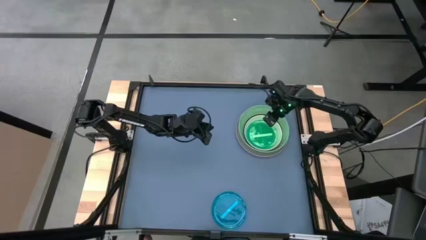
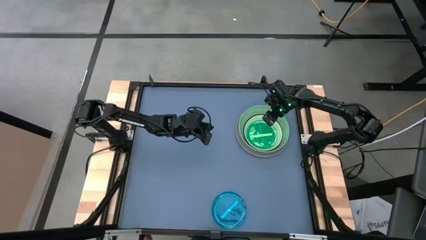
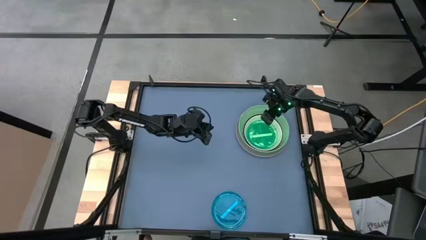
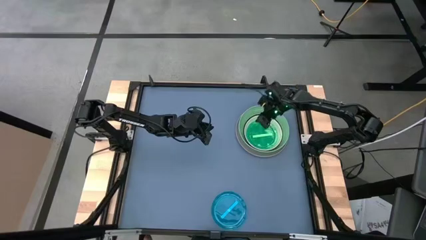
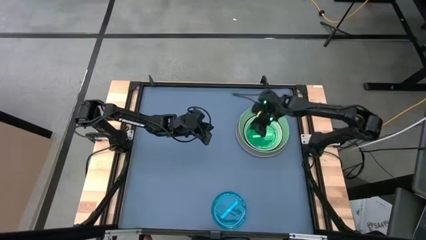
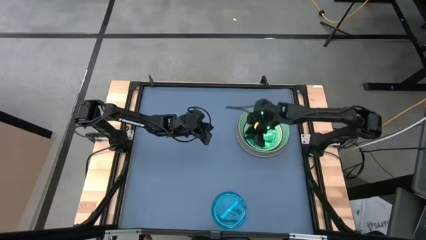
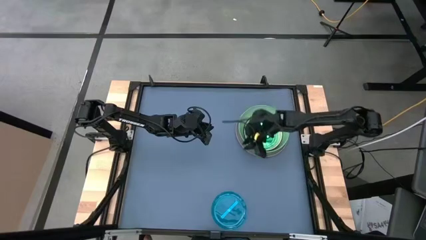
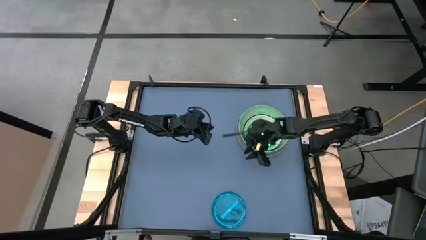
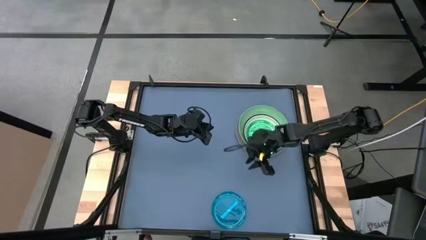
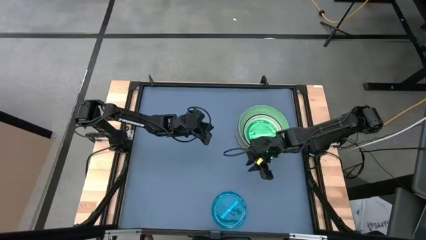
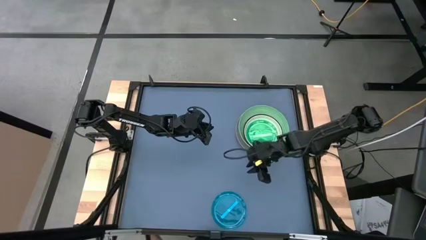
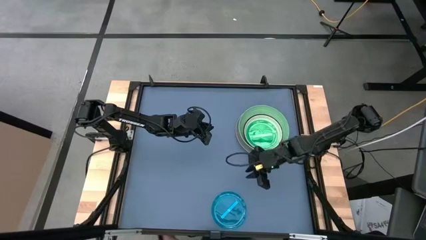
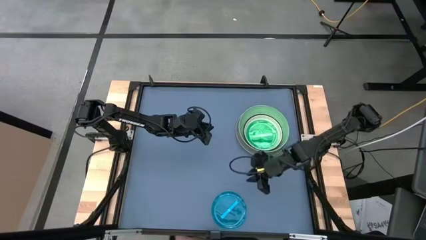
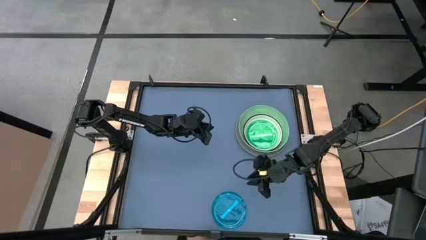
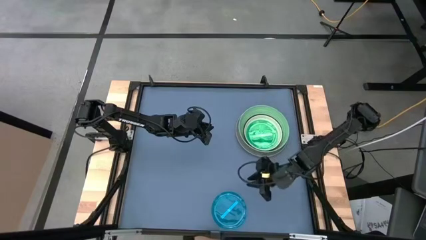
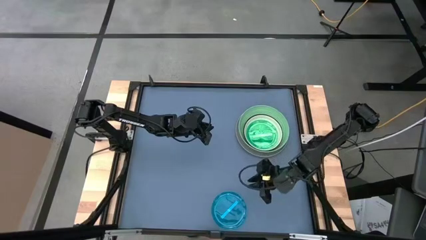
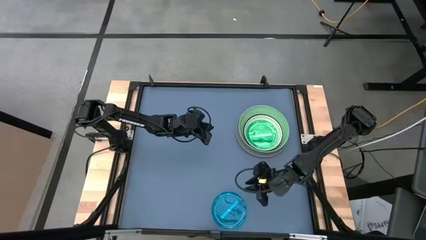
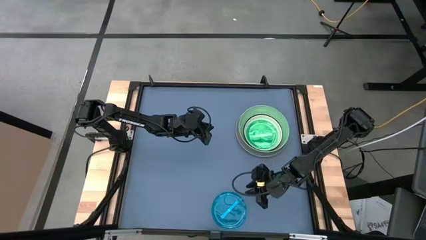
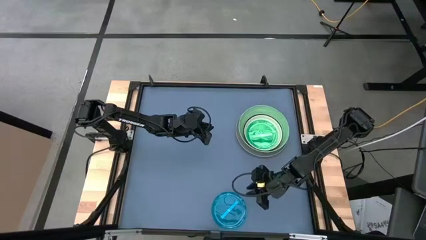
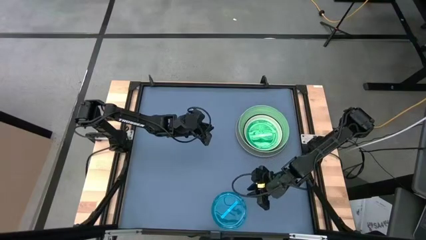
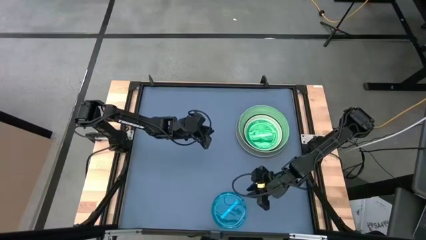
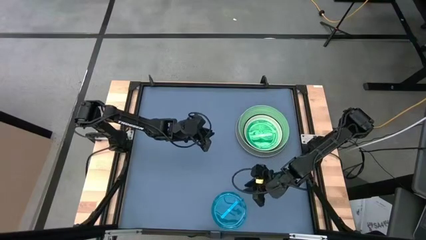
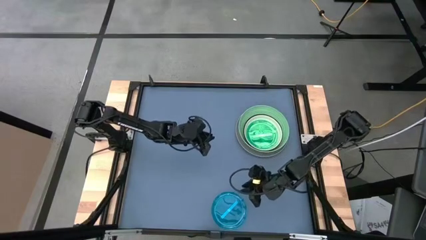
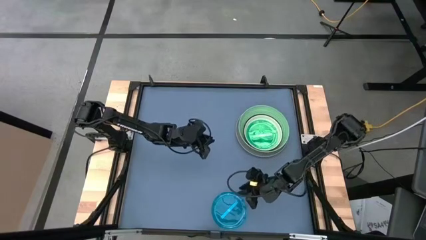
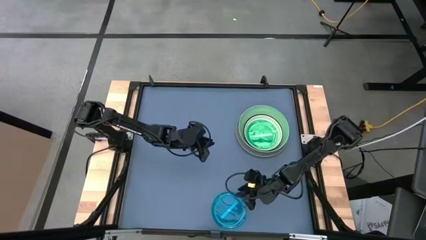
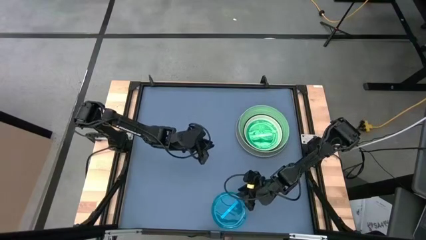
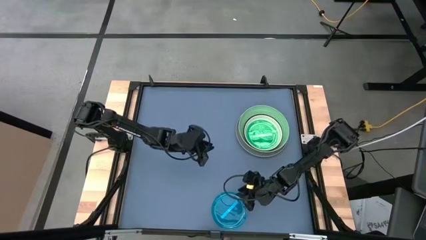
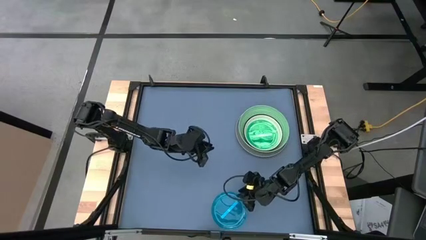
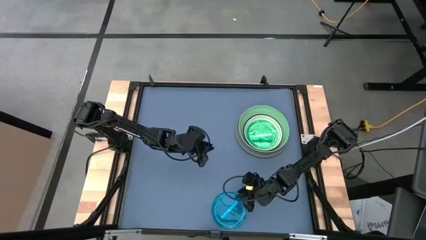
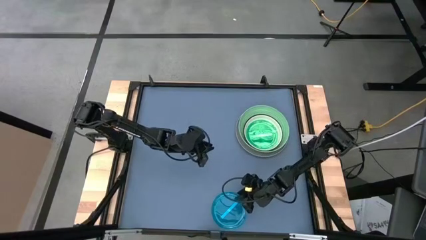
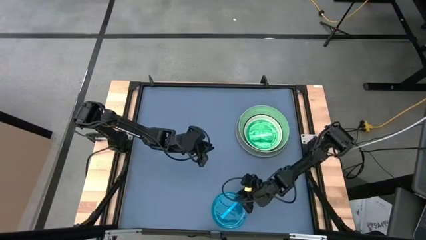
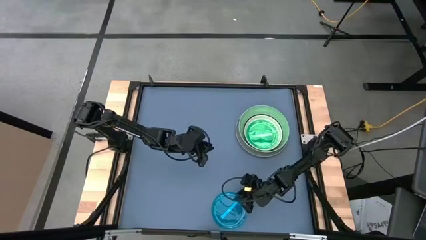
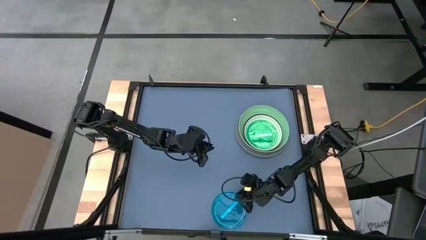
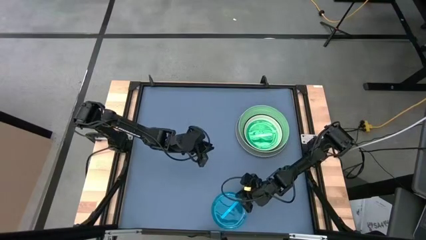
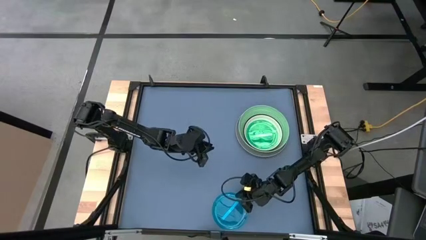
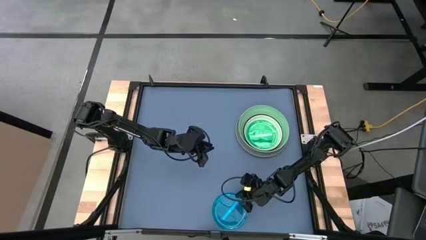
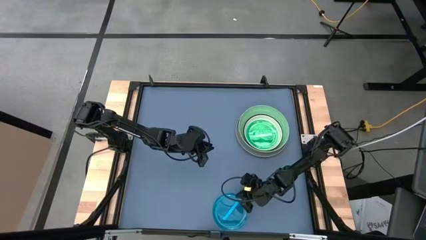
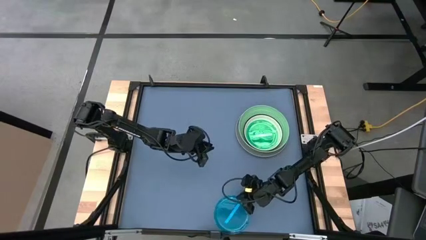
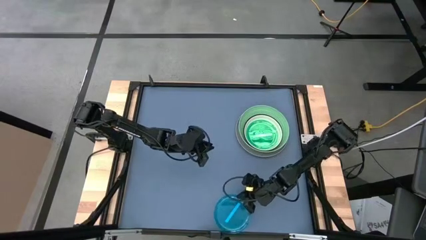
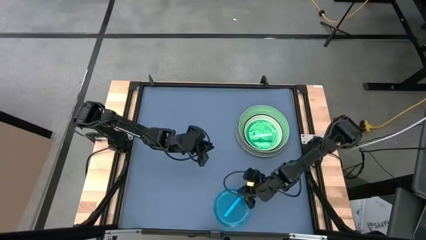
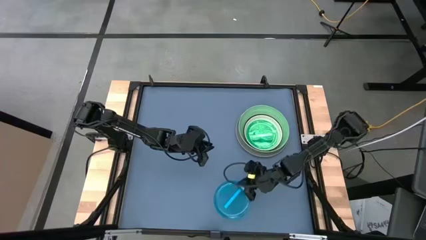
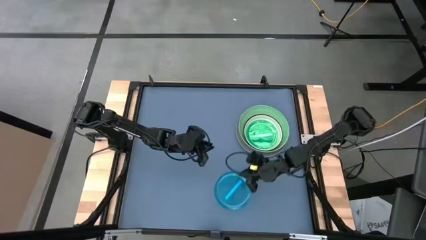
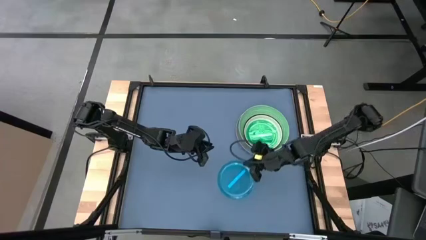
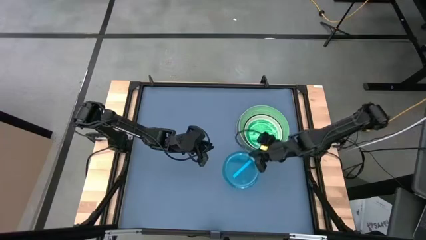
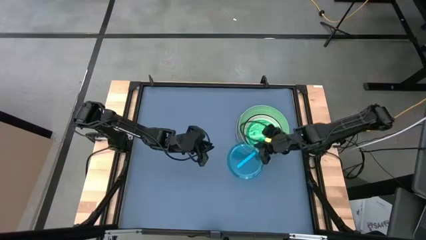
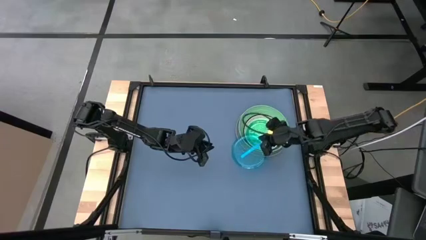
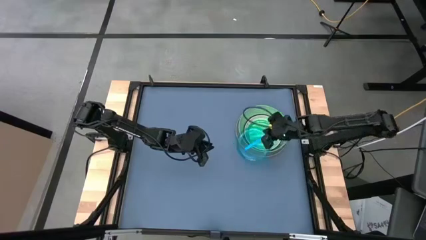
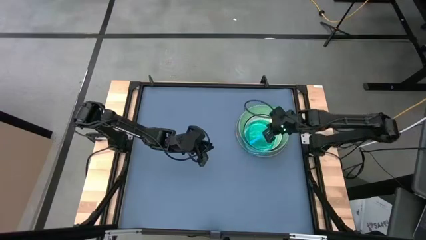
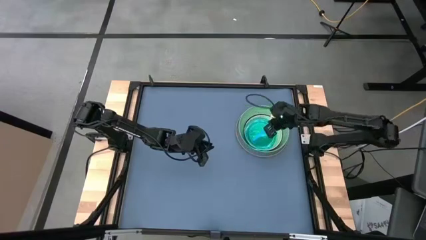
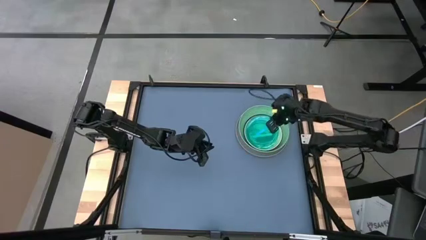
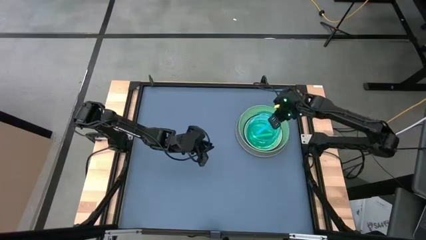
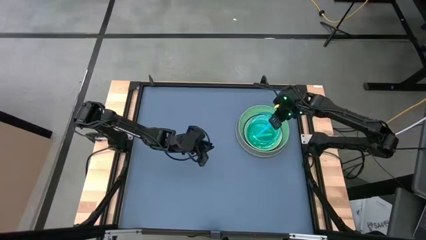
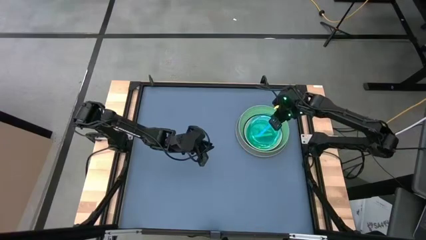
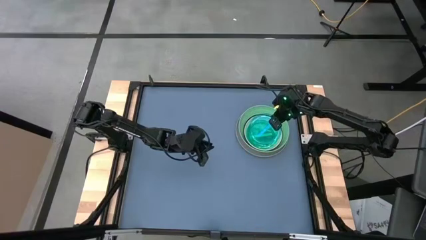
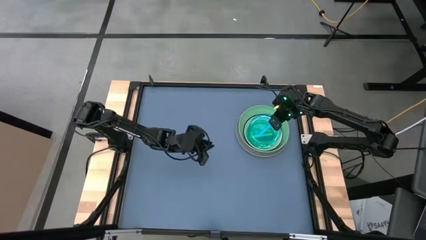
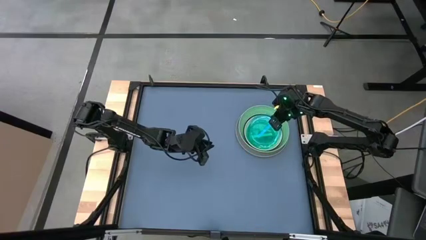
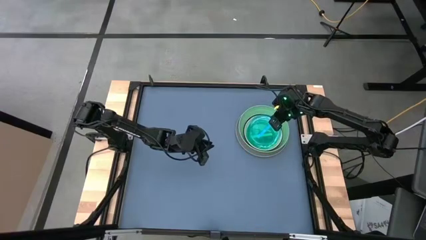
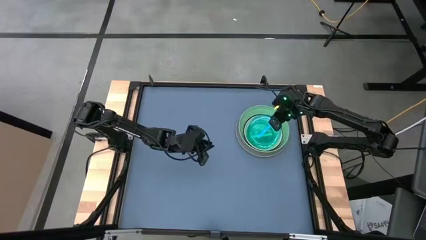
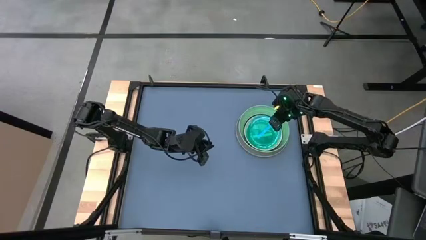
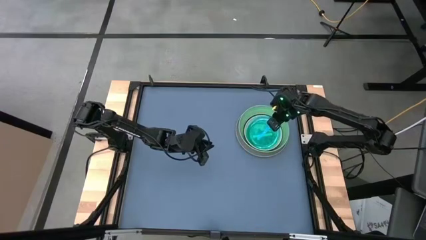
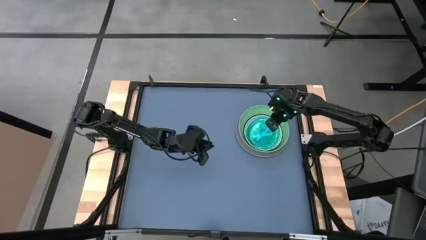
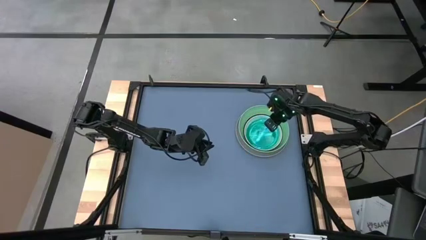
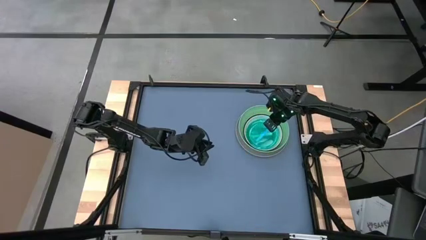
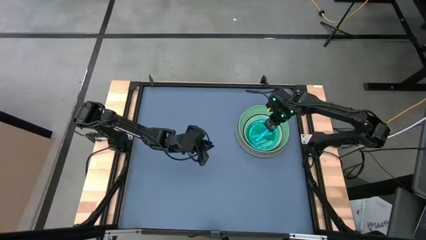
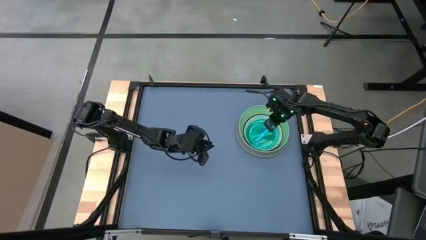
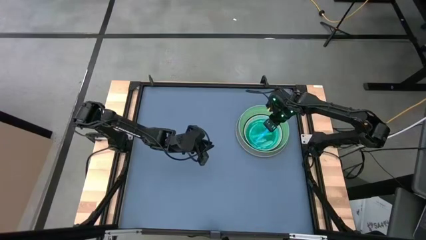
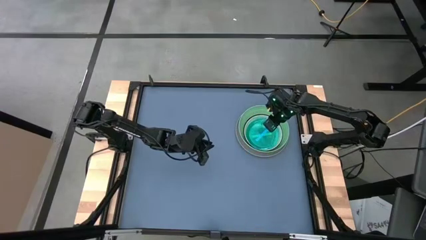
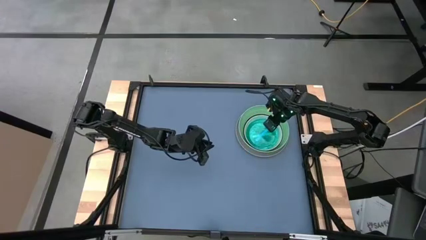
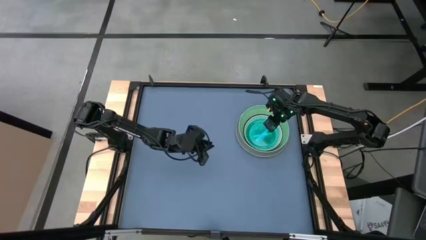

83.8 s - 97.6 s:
Task: Stack plastic plates
Stack the small light blue plate on the small light green plate
